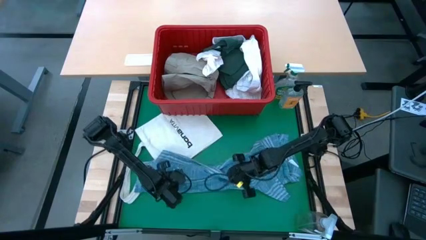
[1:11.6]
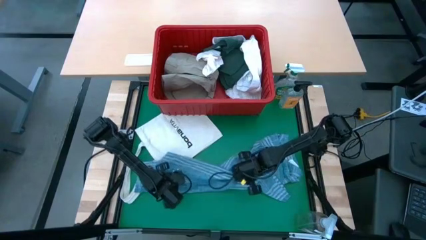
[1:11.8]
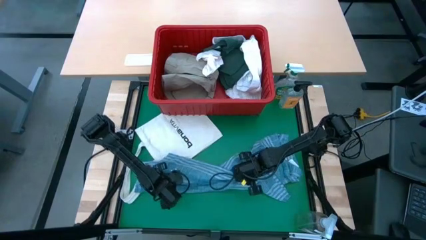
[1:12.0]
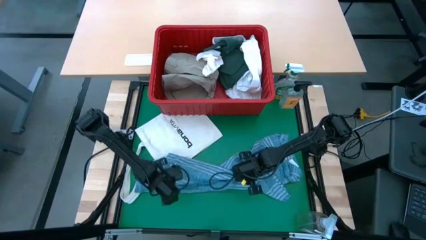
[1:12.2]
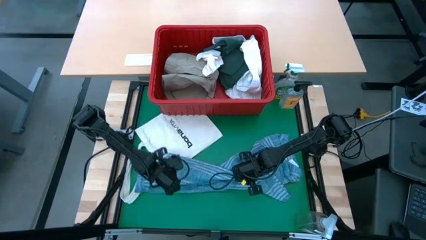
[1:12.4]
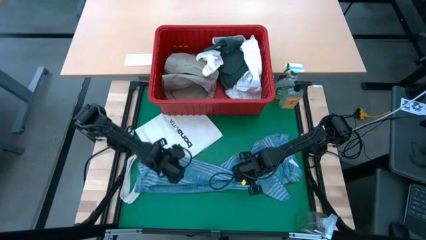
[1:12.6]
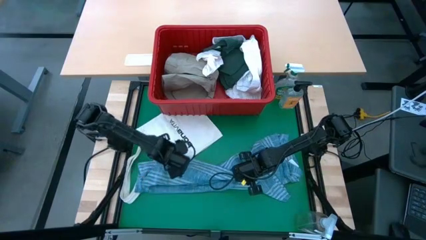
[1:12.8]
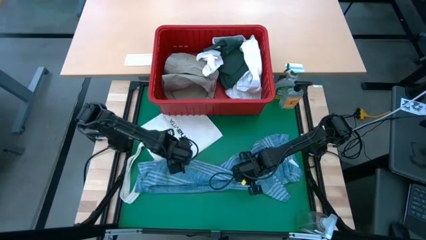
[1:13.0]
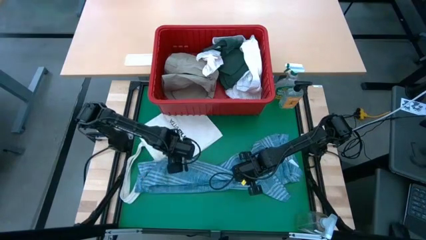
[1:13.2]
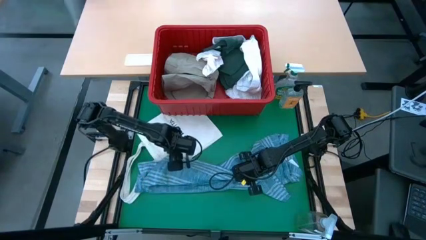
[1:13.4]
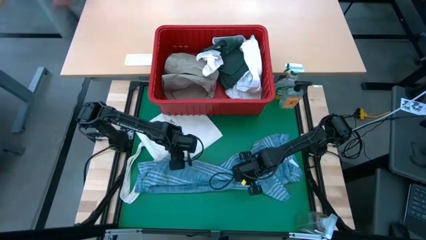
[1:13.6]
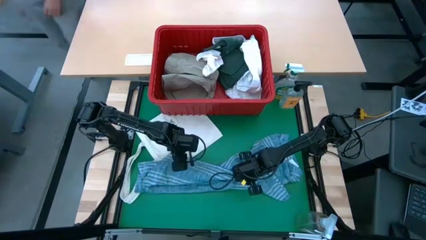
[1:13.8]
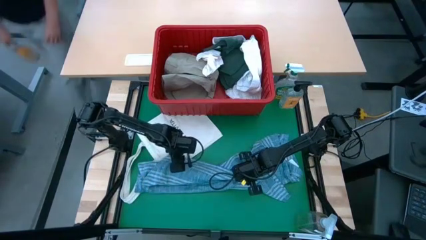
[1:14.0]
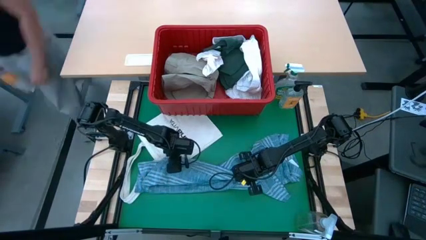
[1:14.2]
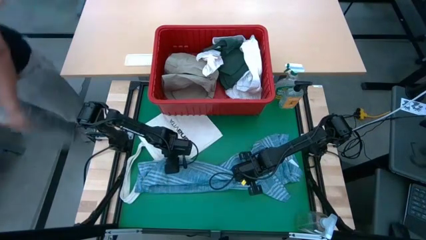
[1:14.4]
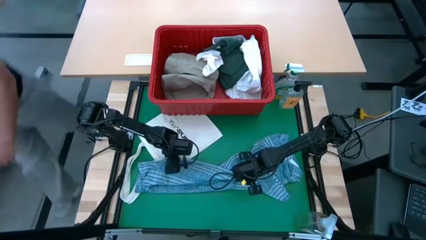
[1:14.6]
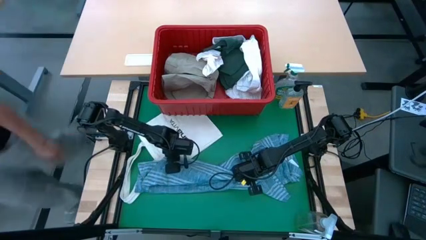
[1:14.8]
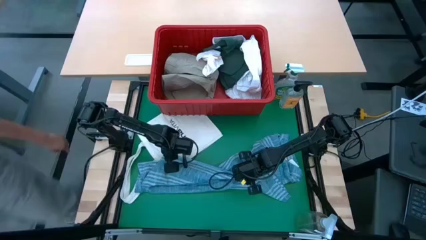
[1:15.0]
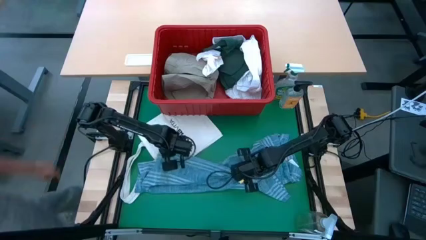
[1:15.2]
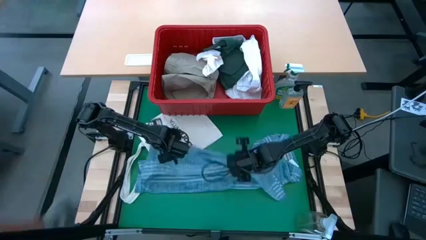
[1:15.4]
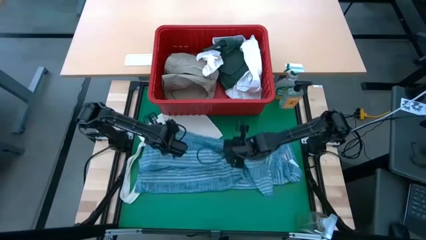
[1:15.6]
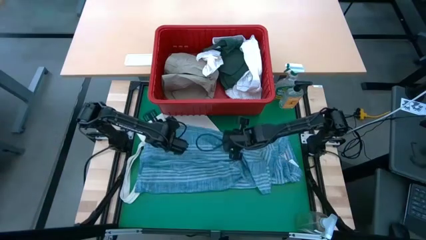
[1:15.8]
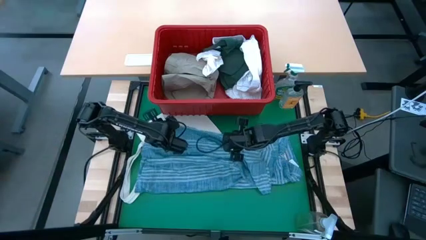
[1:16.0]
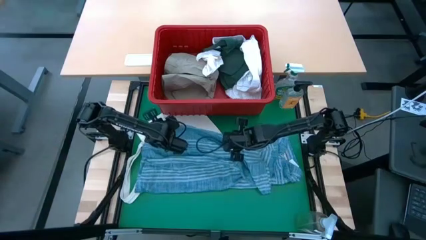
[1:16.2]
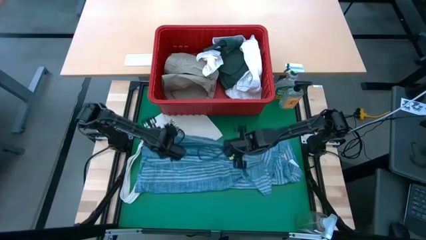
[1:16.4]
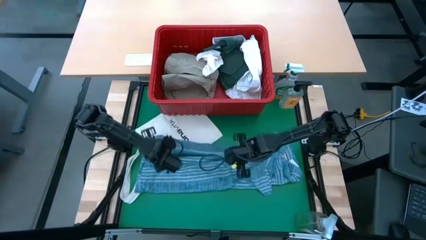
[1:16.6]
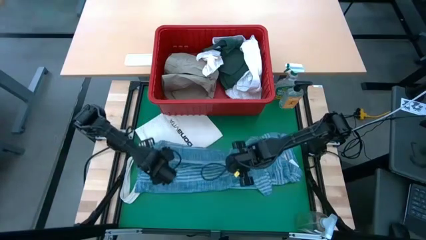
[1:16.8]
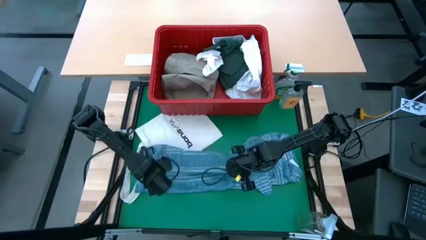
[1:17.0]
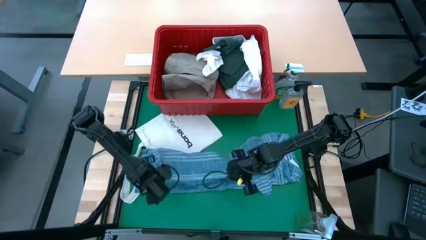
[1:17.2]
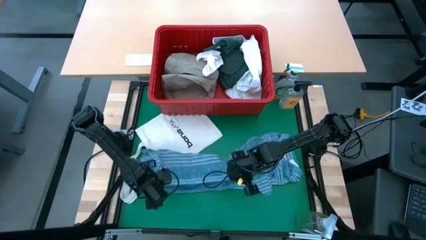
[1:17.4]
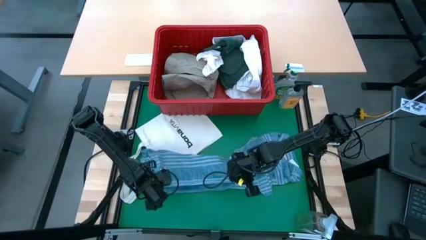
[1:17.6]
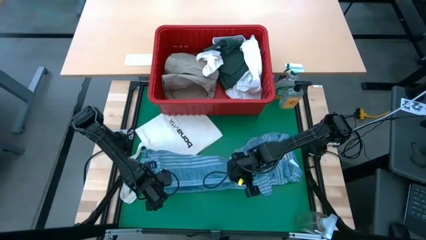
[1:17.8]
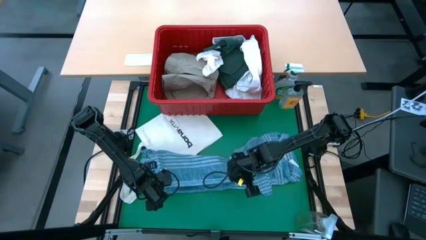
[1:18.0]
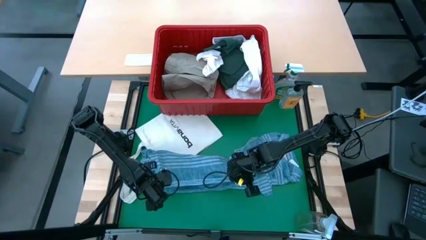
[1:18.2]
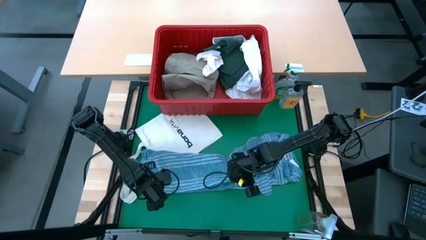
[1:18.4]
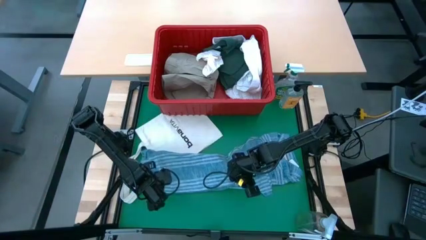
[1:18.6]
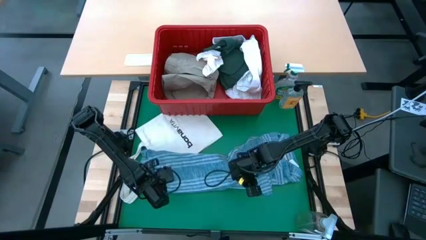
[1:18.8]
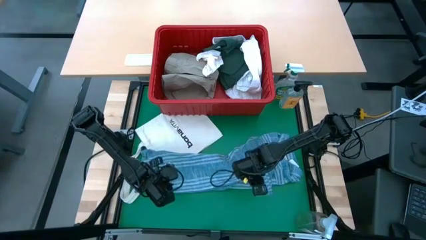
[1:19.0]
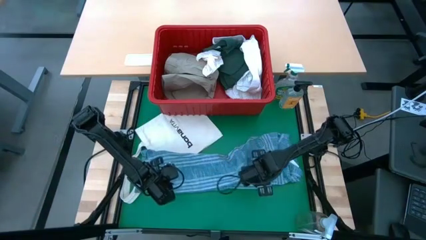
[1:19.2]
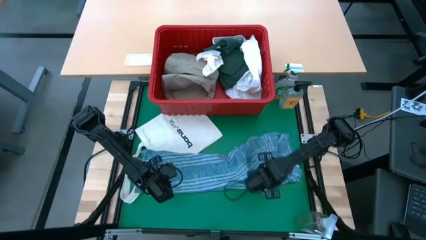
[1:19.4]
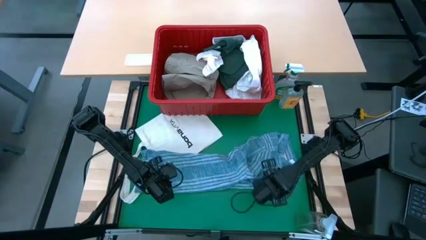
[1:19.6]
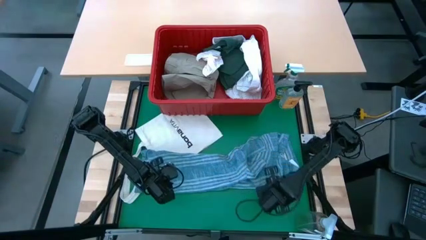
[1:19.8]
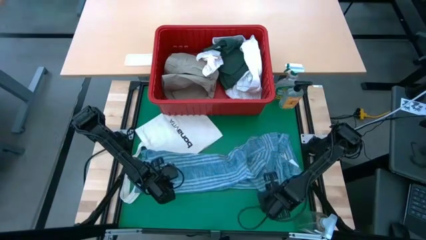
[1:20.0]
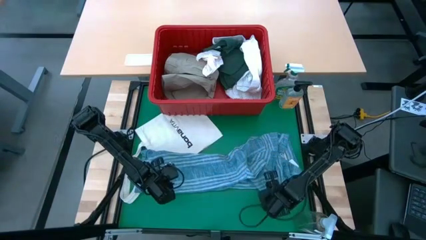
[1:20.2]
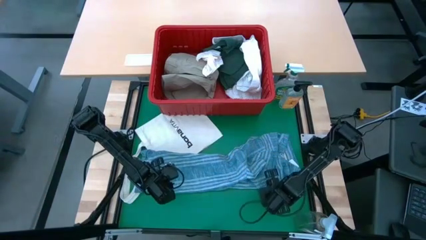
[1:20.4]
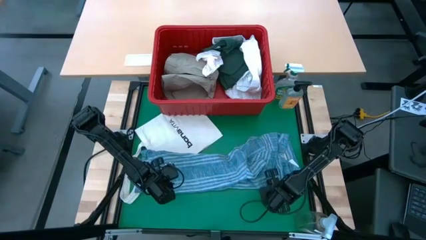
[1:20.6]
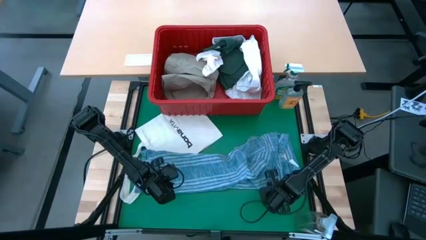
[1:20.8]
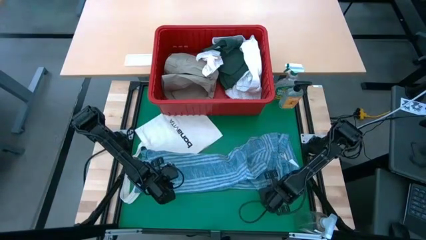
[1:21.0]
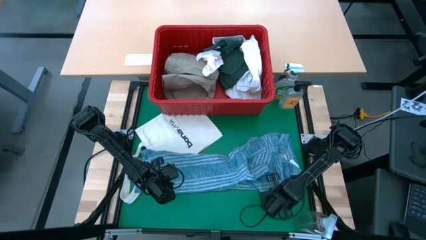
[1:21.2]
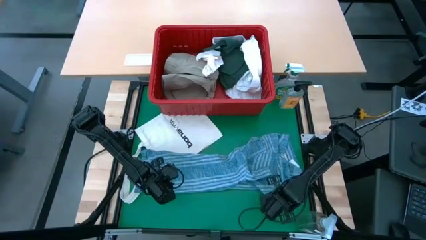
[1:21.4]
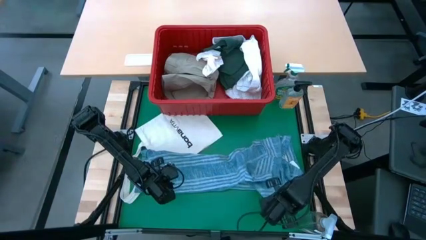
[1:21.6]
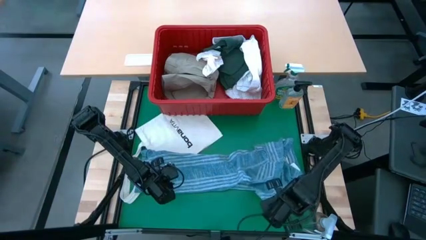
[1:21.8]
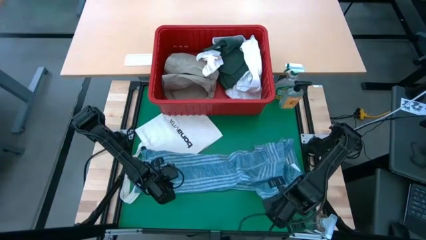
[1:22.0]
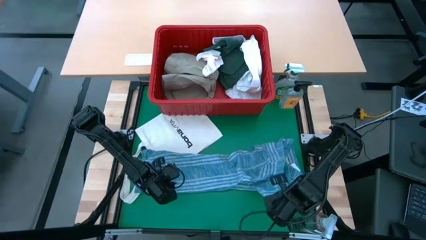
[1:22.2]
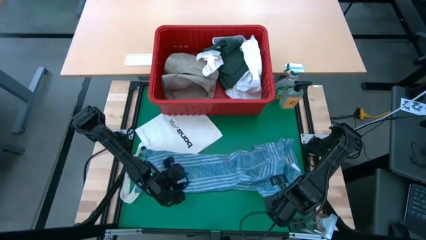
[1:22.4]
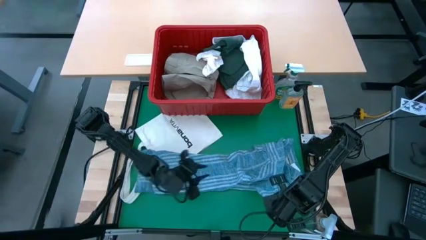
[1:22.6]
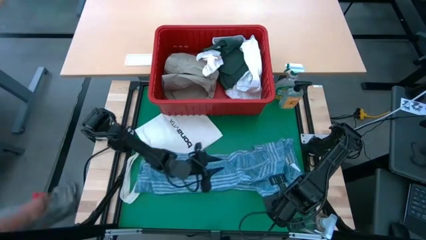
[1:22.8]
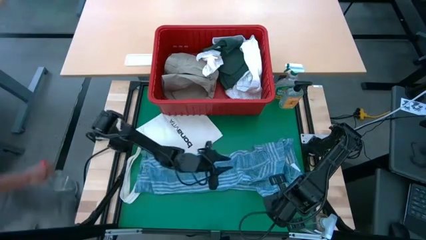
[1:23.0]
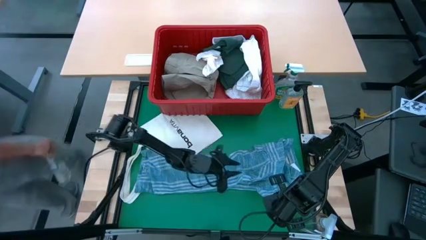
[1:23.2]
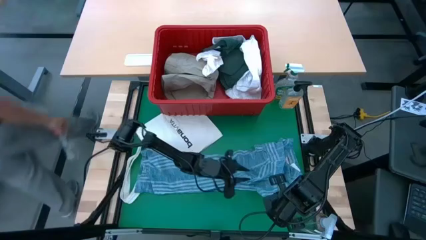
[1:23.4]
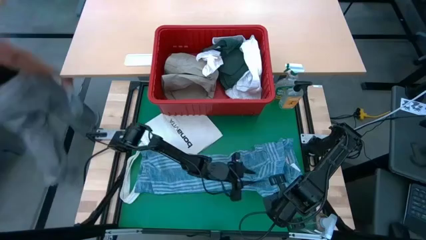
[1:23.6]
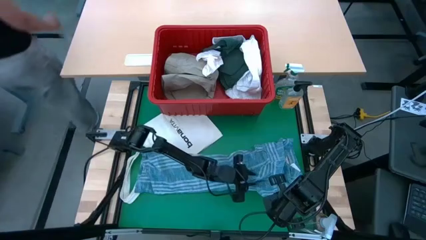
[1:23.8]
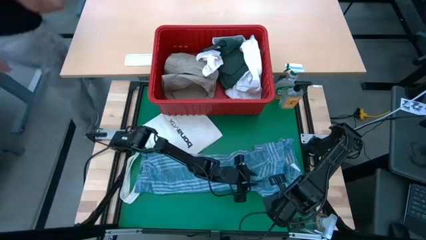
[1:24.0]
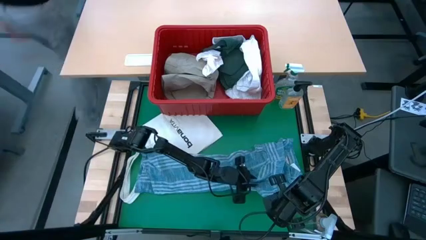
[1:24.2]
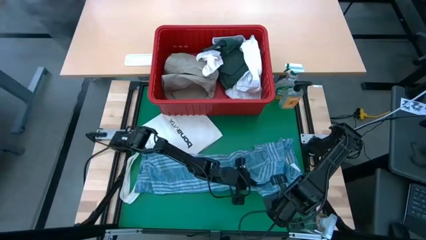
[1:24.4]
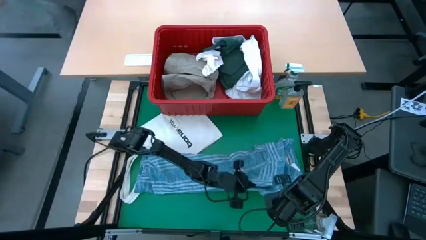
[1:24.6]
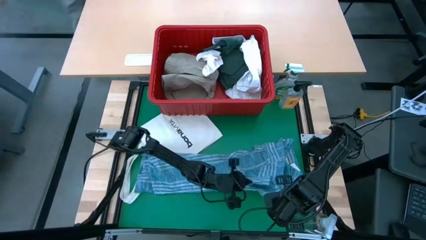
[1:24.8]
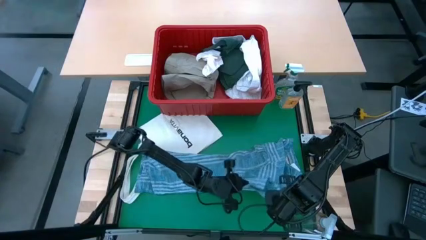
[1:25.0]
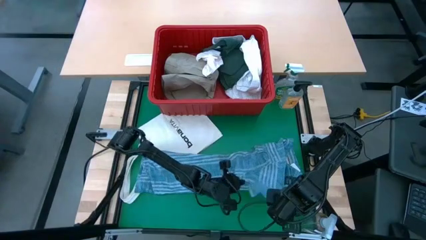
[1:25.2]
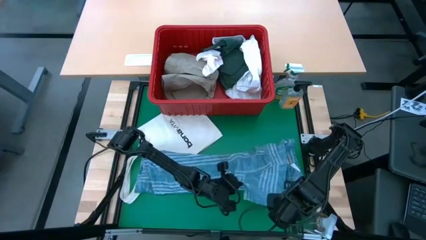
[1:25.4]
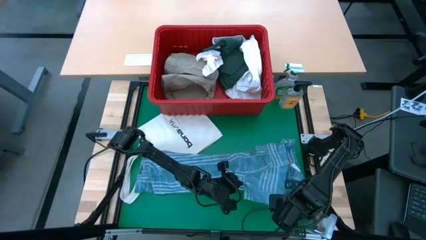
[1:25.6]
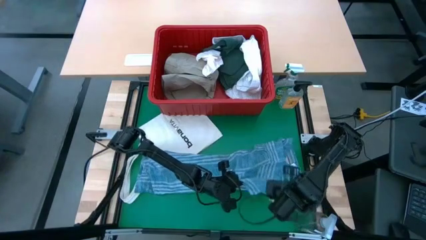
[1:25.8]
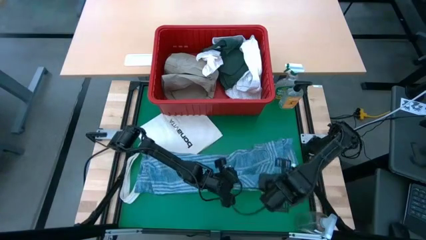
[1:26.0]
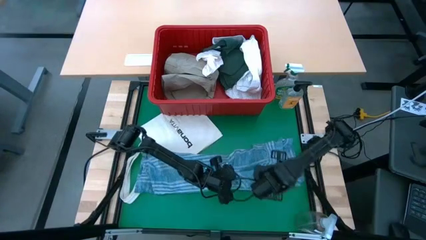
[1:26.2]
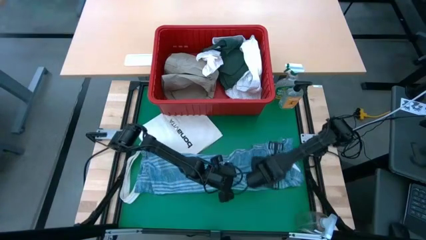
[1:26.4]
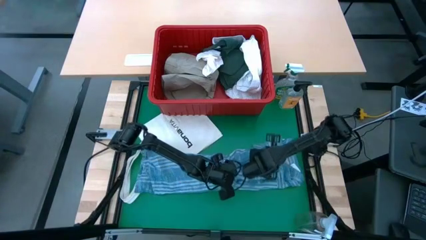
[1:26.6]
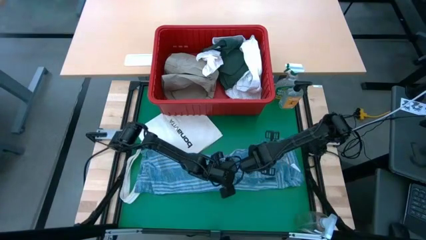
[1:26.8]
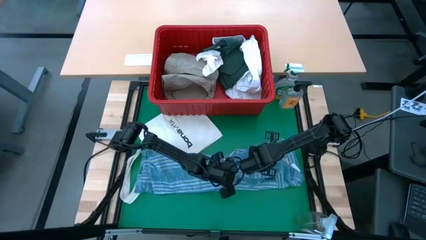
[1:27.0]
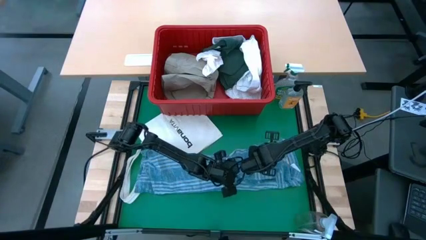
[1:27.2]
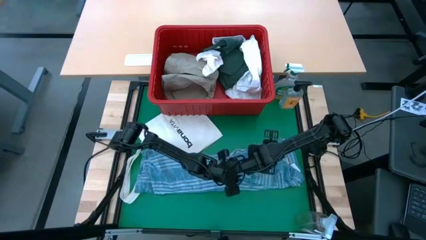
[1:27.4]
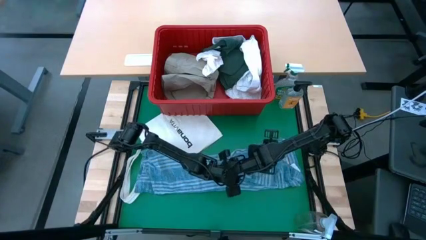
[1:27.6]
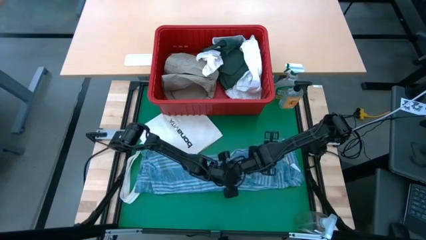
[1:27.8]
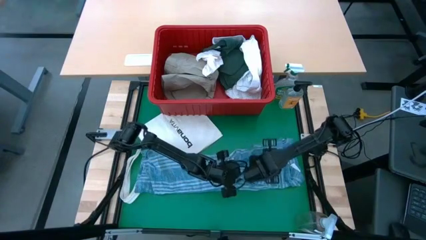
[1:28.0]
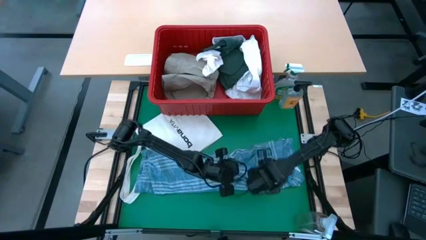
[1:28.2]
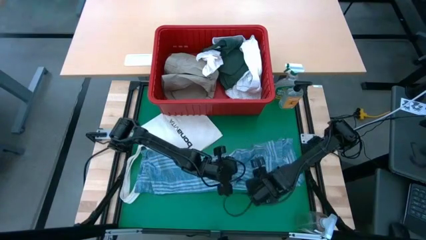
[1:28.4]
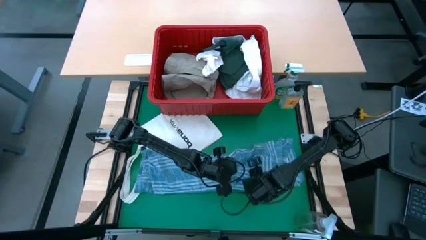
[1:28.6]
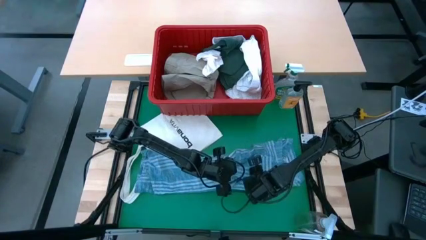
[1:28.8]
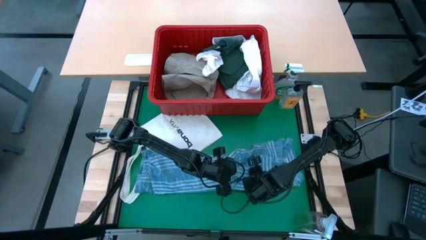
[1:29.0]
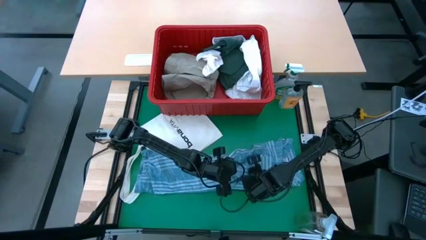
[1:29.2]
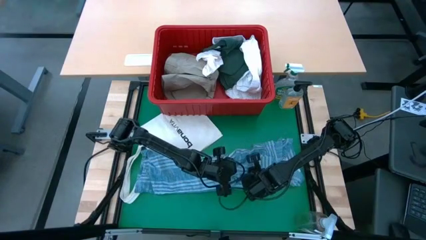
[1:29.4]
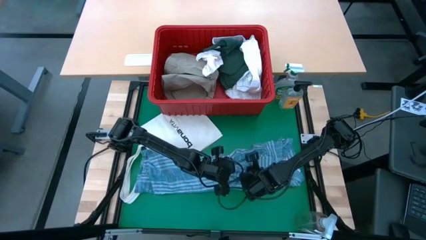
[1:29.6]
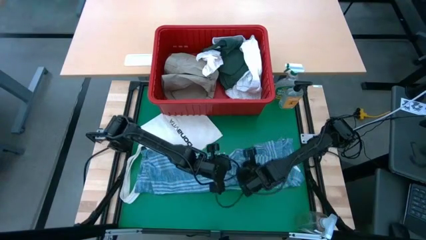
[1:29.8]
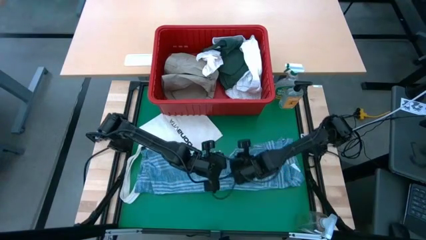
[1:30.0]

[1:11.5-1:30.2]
Task: Fold Laundry from Bin
Fold the blue polo shirt
